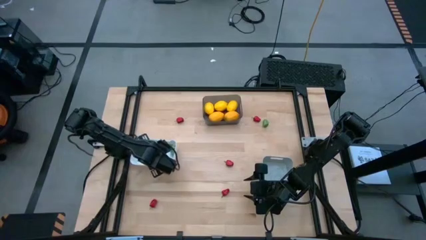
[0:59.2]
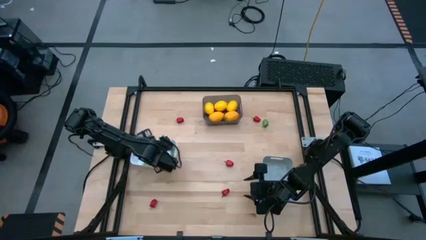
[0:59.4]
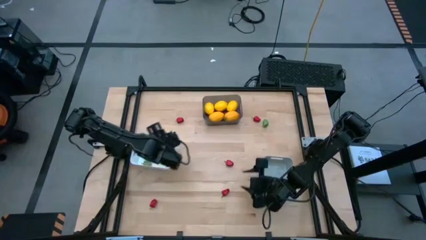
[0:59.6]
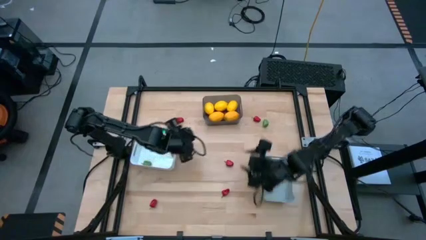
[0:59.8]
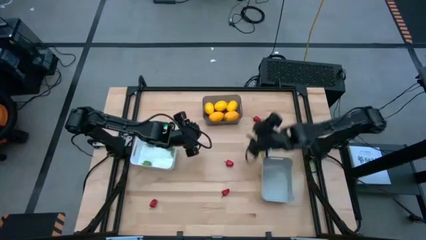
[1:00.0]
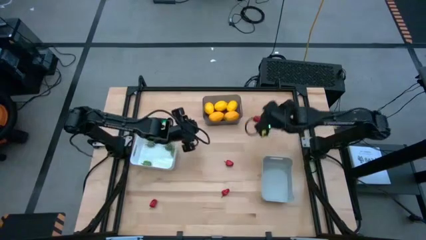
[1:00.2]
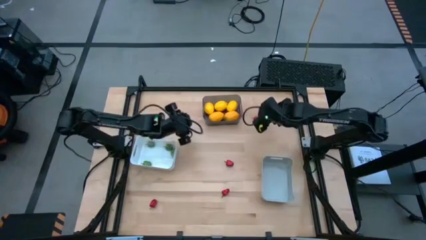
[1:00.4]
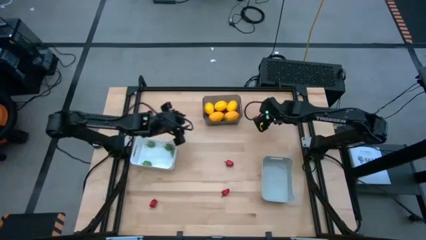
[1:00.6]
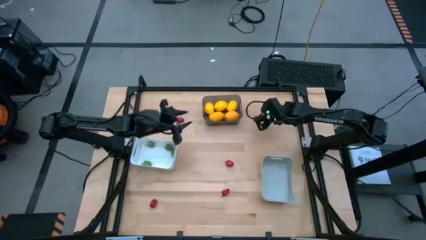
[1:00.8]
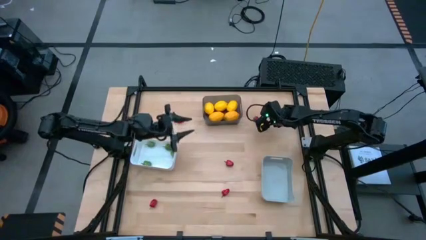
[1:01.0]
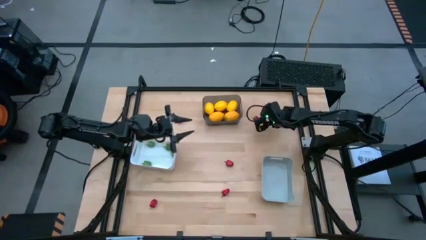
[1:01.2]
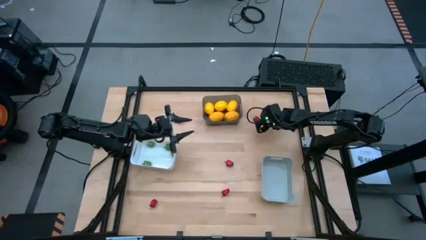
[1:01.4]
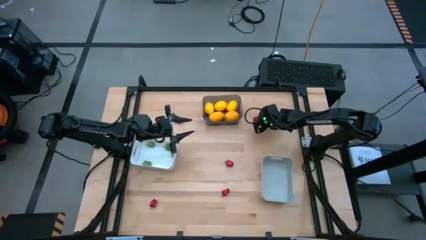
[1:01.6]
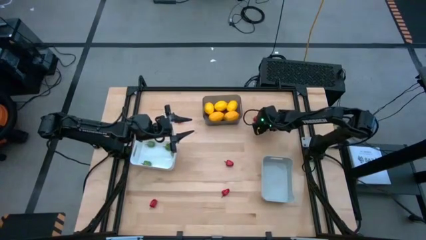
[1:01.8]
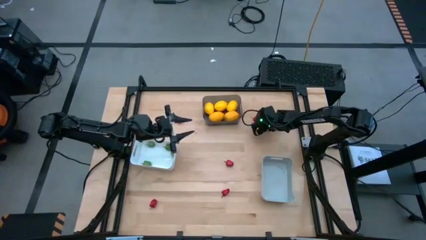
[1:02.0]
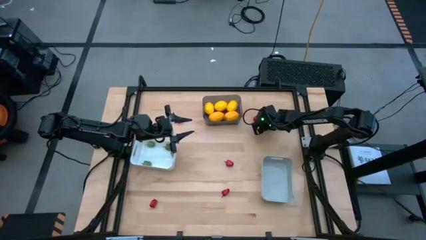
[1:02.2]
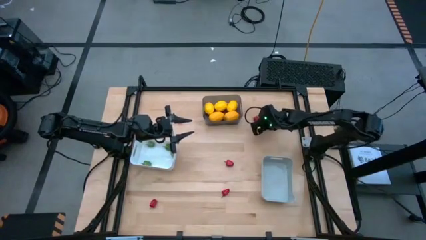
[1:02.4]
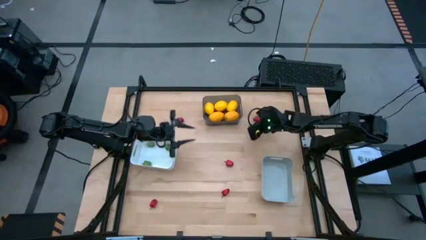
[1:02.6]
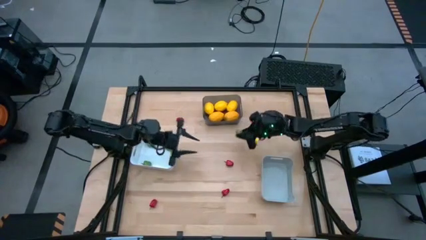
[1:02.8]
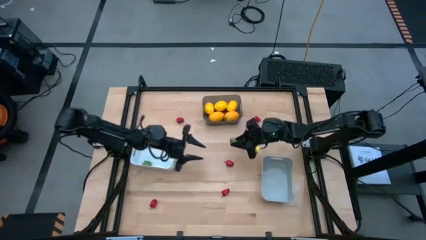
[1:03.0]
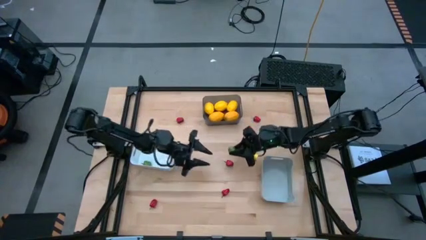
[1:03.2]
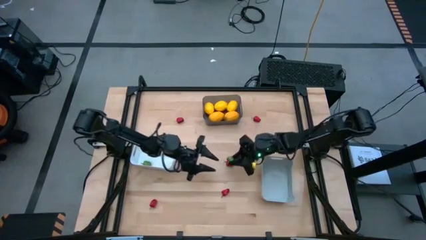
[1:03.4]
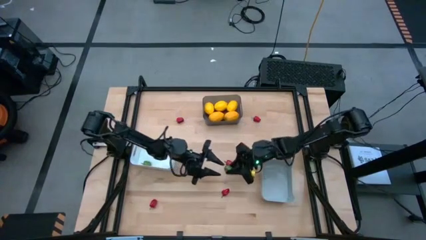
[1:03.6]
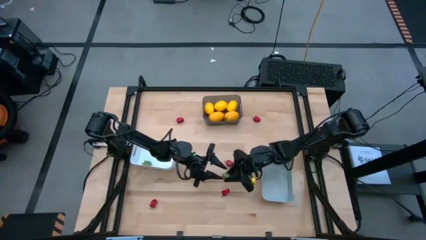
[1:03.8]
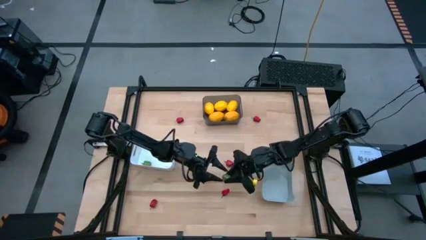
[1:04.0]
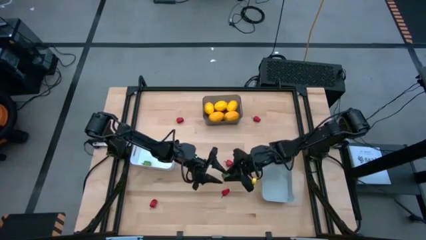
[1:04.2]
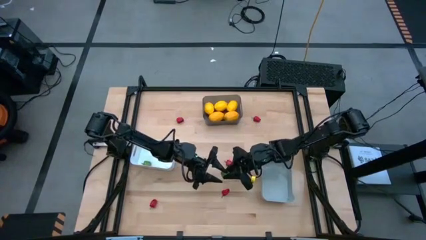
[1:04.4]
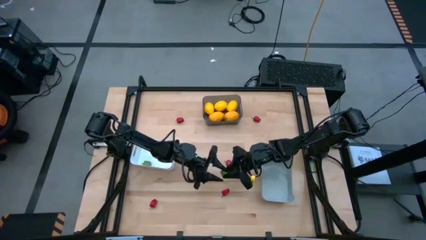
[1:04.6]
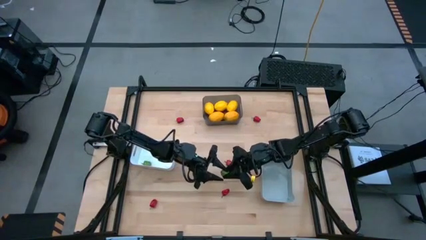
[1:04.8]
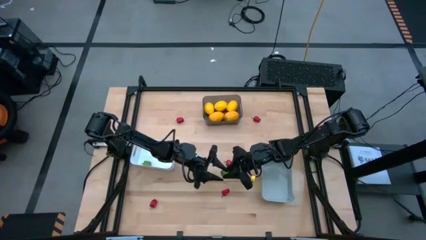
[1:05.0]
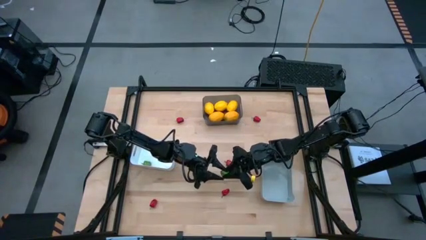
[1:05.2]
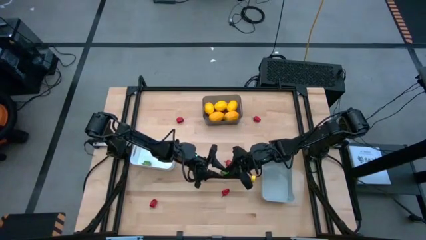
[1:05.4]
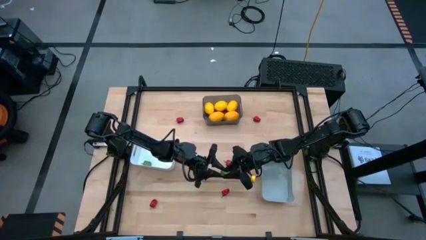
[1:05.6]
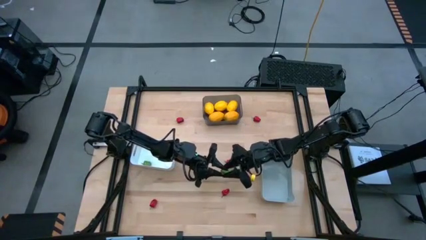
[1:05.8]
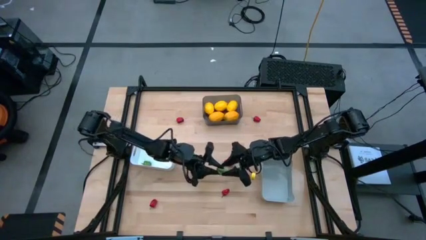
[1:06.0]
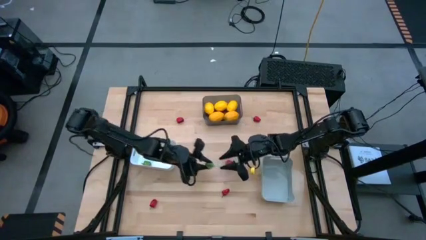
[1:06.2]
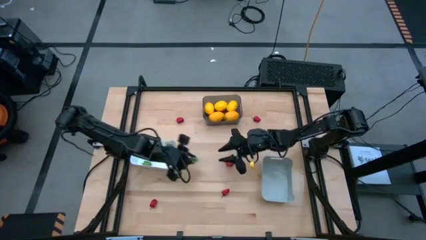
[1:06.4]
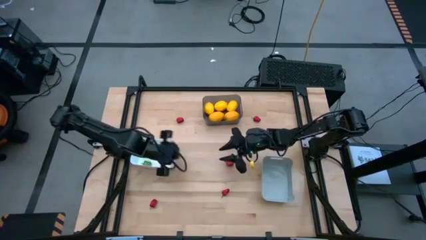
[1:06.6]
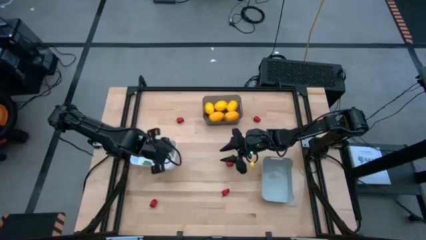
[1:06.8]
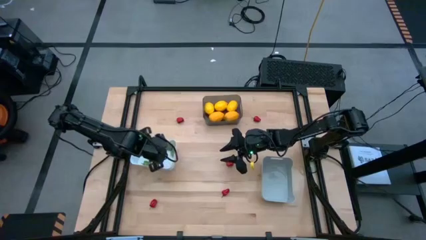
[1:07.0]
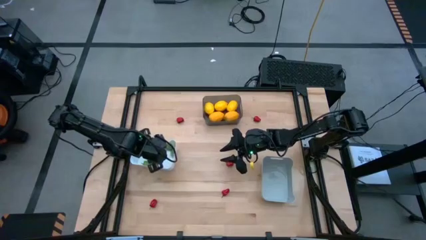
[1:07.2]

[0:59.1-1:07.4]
Task: Sort produce into baskets
Put the green bell pepper into the white bin

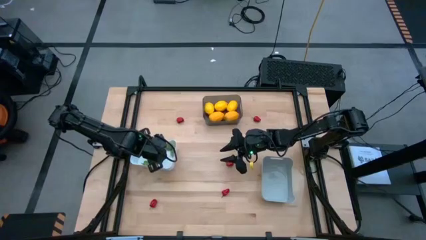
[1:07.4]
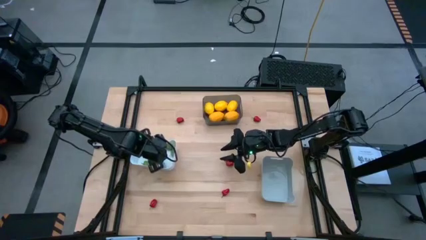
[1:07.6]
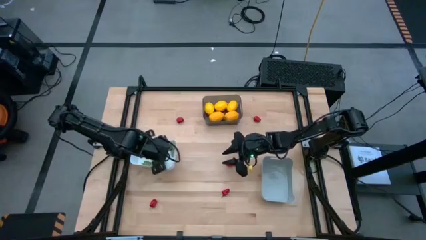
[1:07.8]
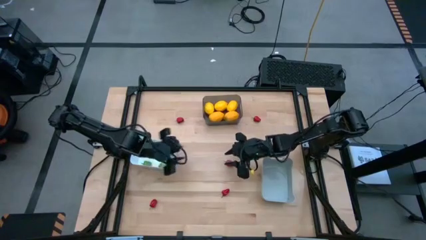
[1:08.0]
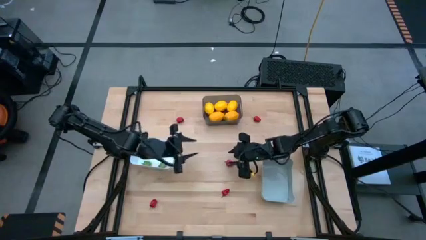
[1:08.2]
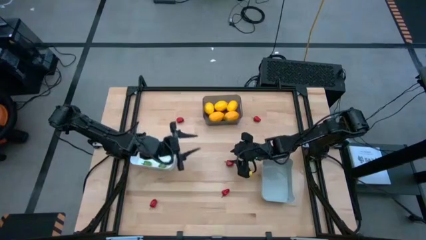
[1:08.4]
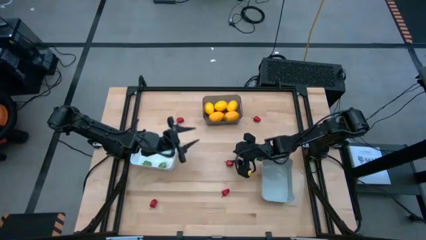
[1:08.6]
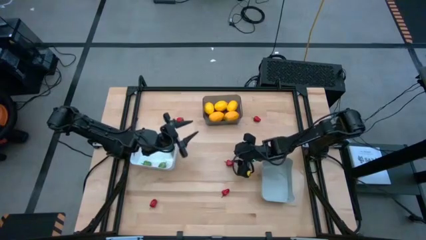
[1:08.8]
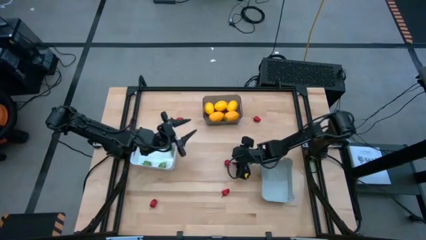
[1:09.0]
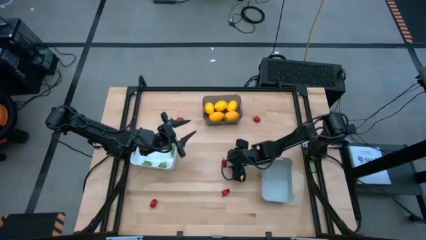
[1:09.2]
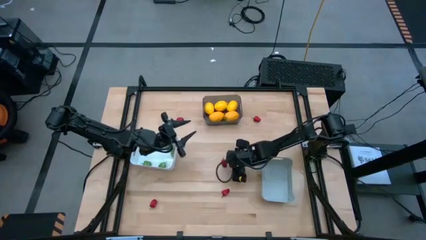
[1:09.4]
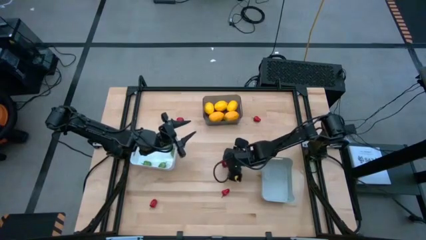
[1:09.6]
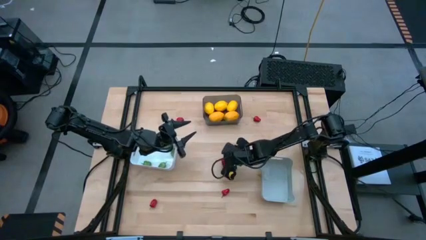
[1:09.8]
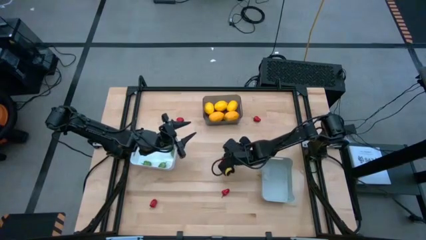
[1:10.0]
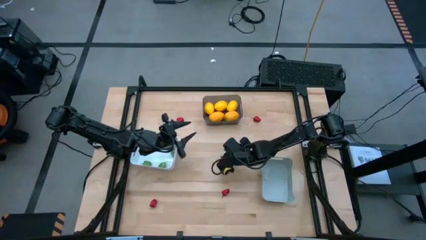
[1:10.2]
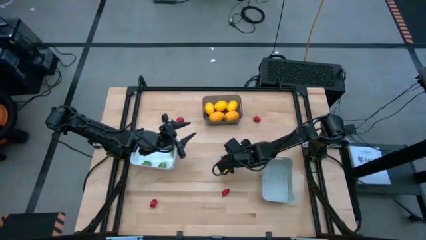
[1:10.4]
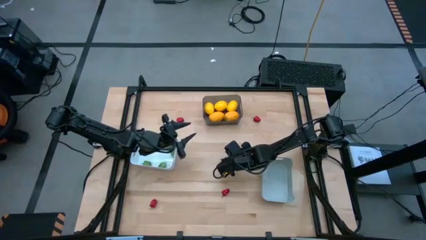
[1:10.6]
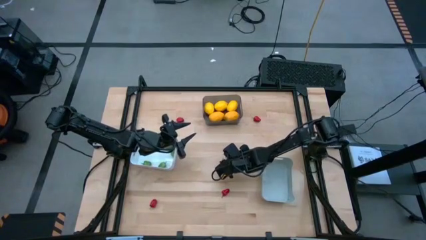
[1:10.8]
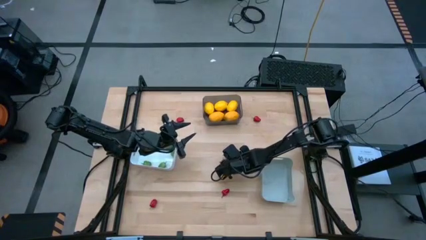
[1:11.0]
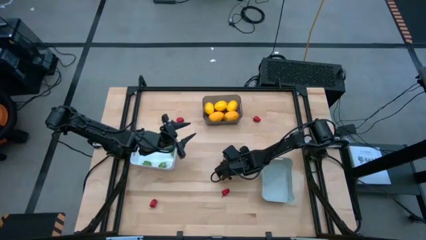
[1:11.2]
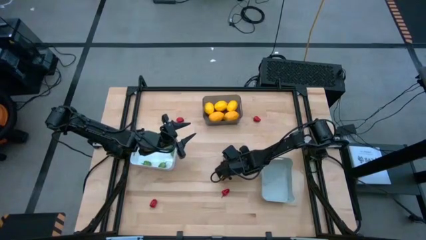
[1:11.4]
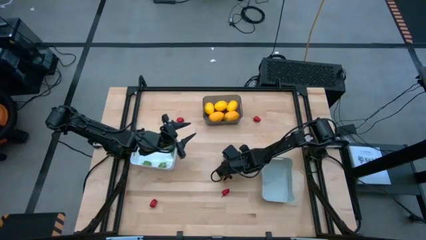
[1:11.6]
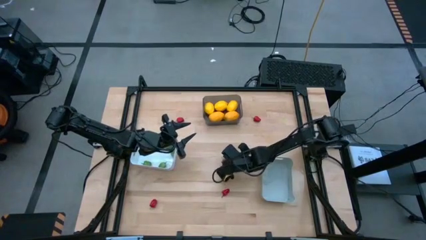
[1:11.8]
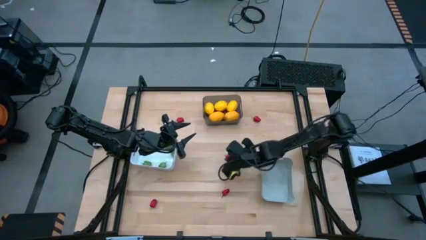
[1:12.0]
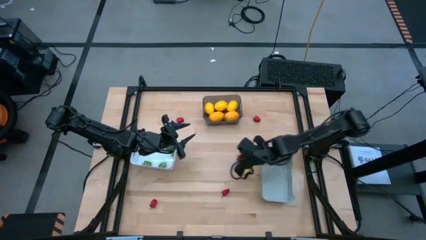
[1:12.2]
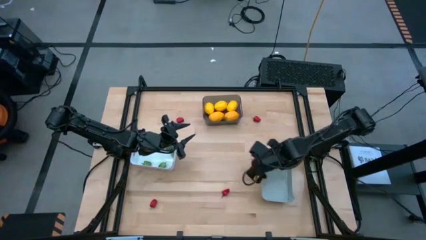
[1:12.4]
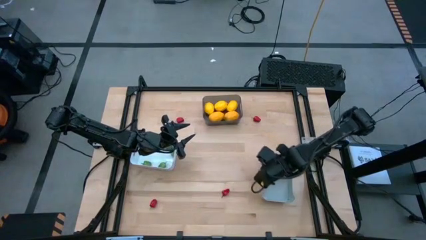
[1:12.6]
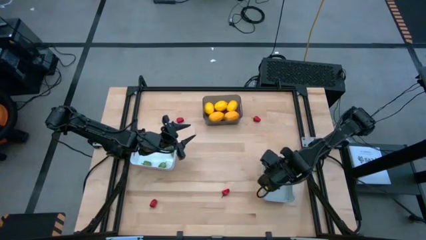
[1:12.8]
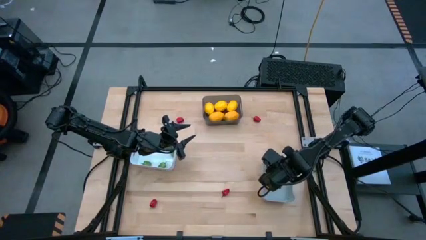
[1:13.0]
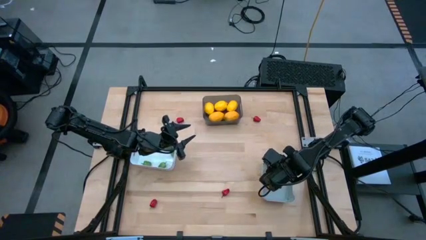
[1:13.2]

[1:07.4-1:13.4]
Put the red bell pepper into the gray bin

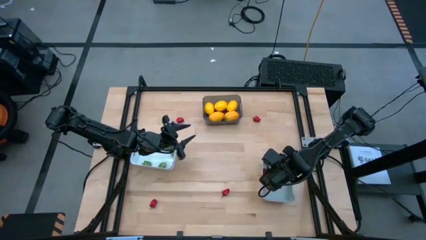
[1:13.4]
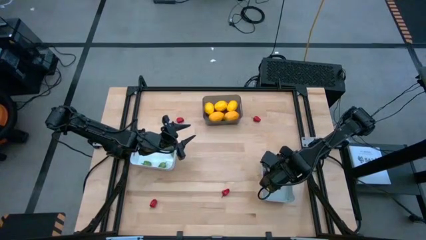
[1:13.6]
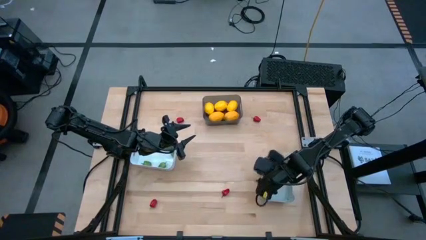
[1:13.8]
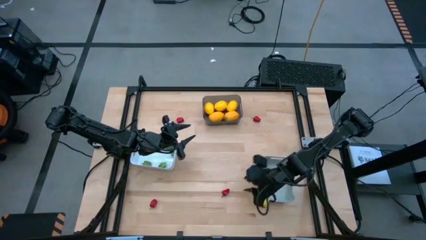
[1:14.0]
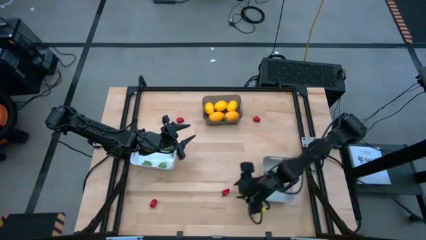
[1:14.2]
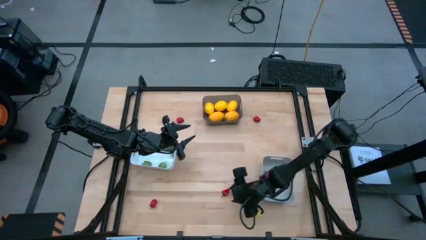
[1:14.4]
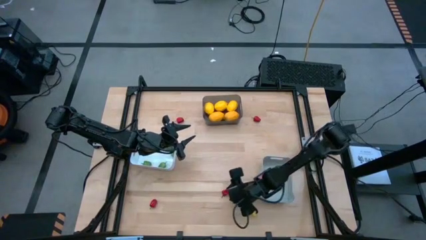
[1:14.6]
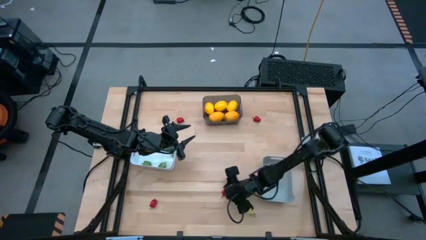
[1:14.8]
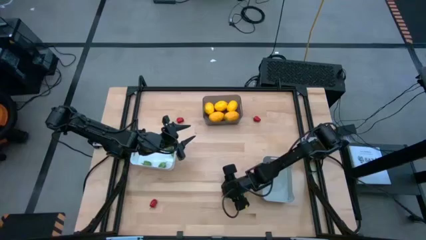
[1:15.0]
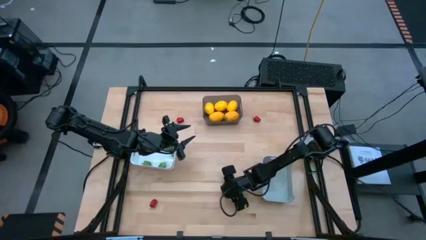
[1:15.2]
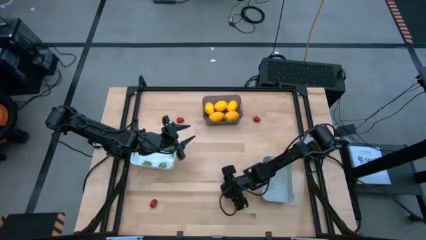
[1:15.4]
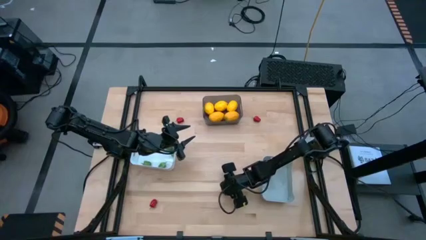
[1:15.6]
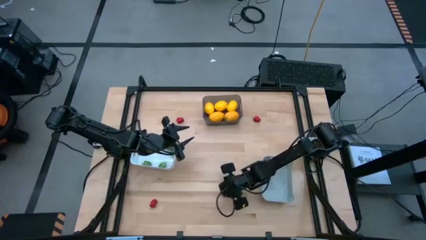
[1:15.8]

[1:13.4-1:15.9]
Put the red bell pepper into the gray bin

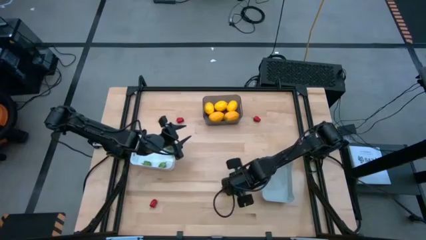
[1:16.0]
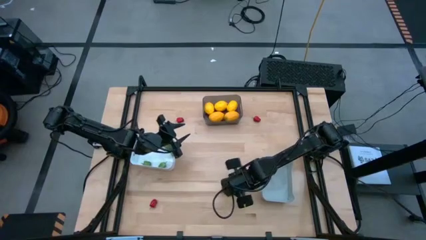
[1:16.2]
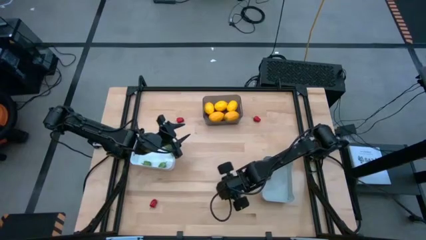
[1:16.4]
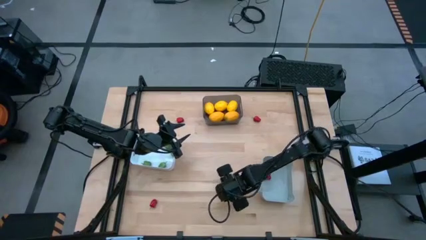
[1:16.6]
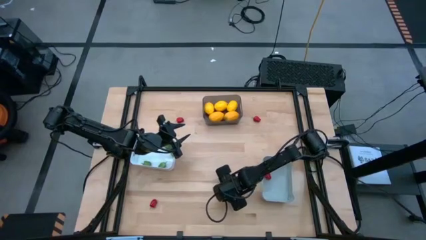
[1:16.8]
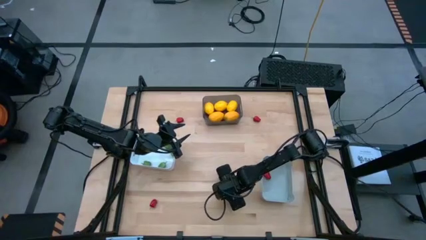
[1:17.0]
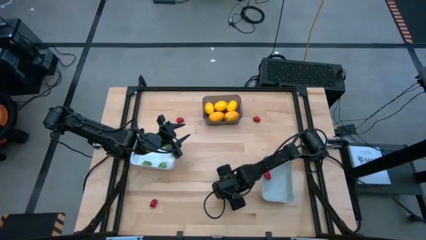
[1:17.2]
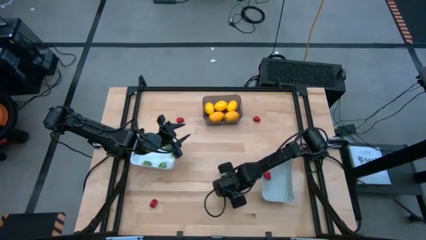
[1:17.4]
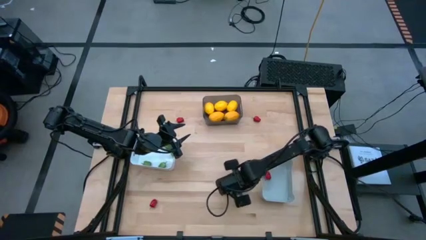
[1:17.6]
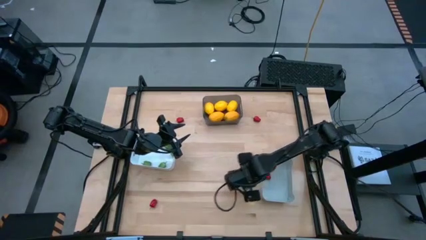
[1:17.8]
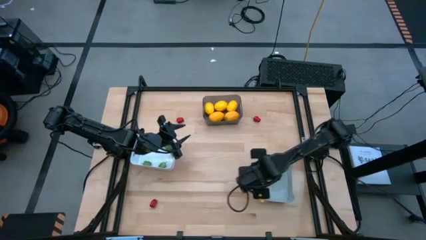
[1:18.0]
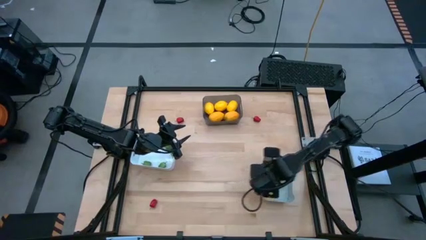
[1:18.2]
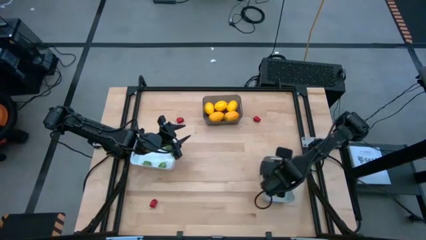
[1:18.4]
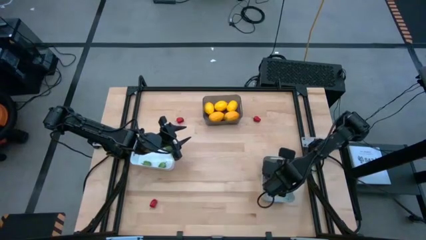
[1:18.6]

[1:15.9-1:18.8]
Put the red bell pepper into the gray bin
